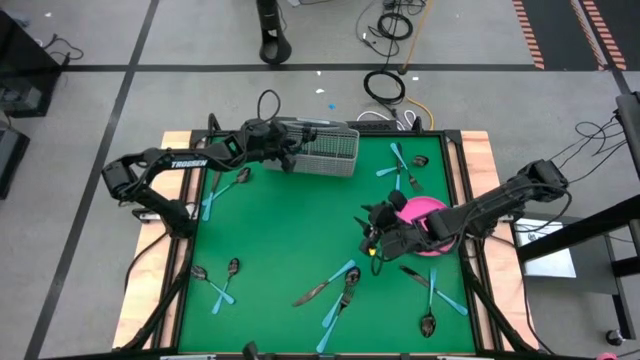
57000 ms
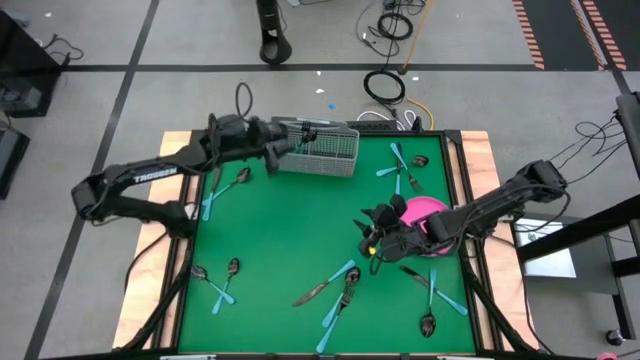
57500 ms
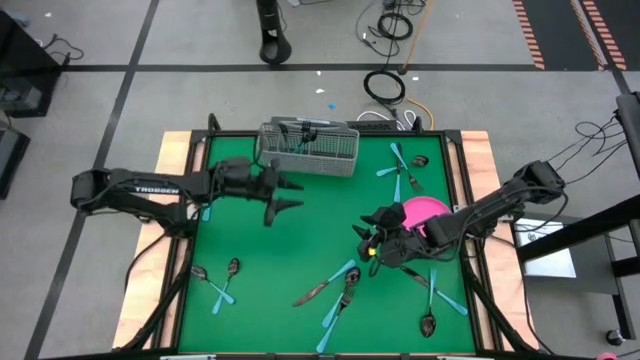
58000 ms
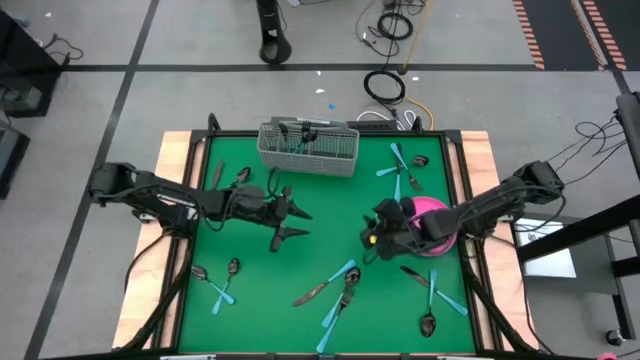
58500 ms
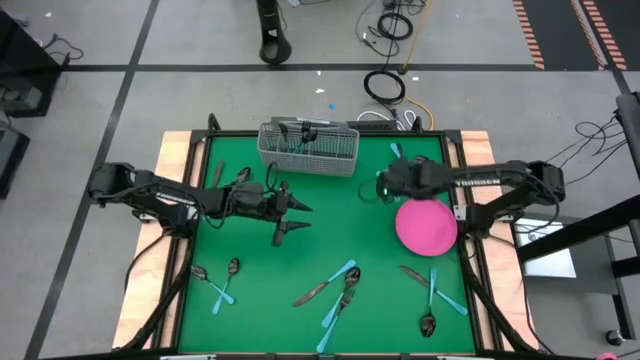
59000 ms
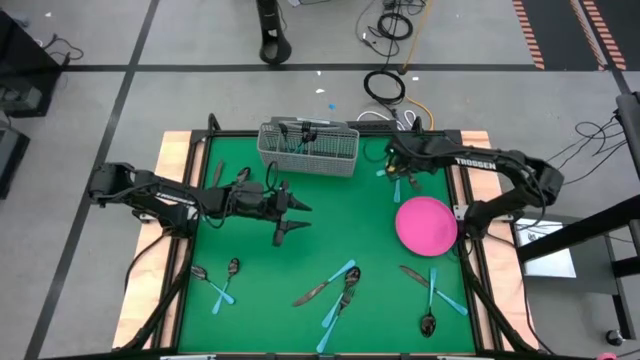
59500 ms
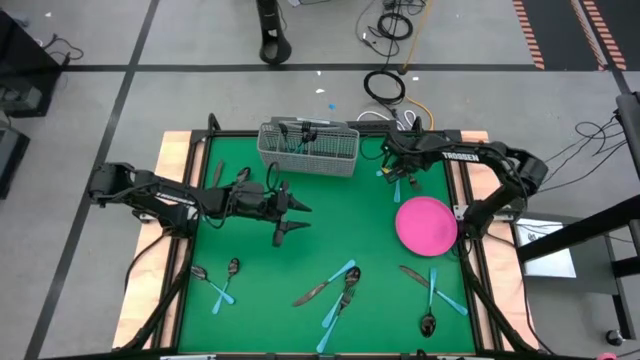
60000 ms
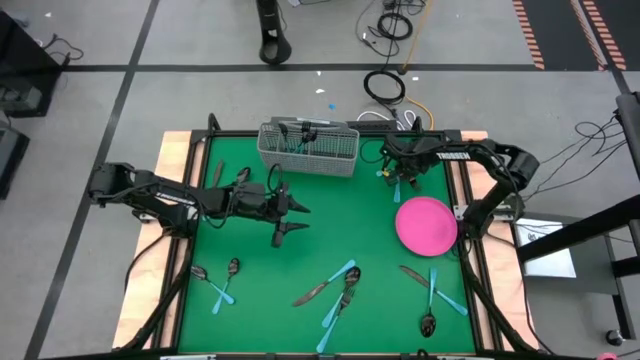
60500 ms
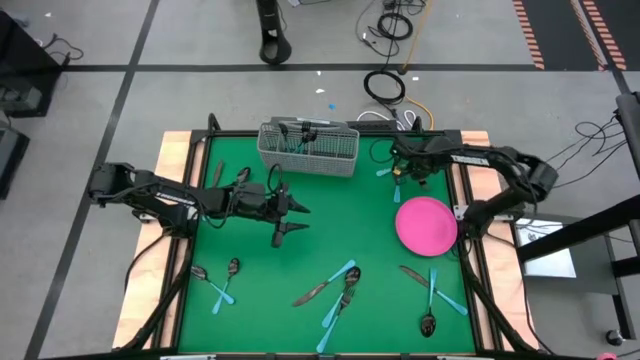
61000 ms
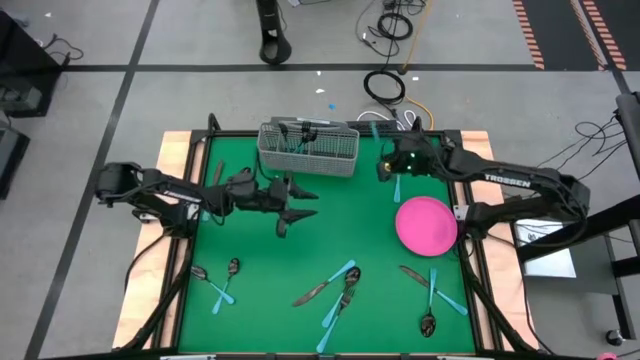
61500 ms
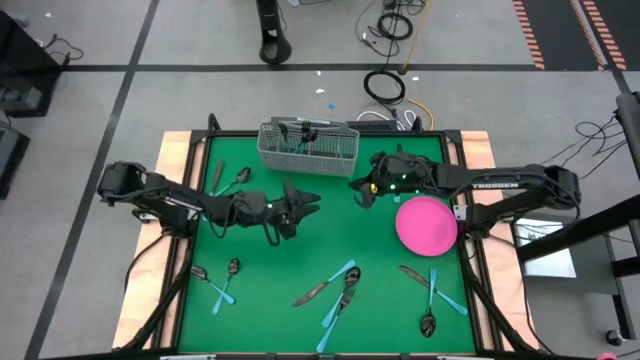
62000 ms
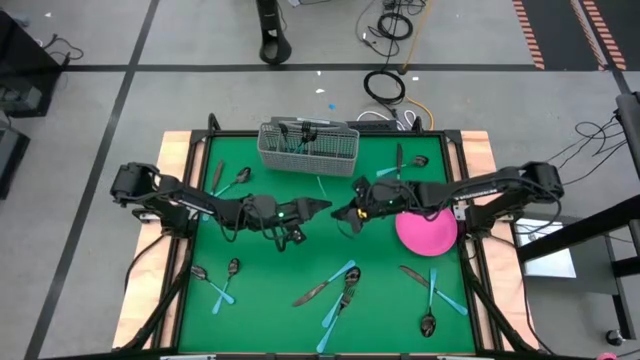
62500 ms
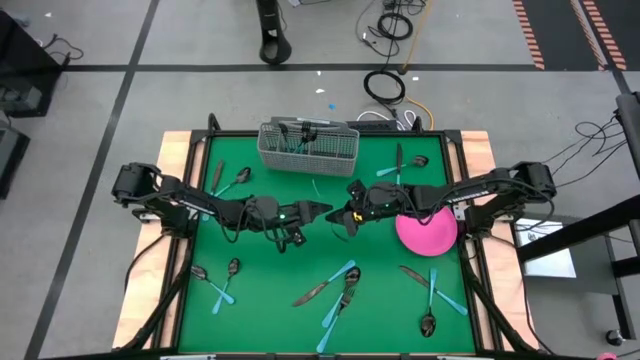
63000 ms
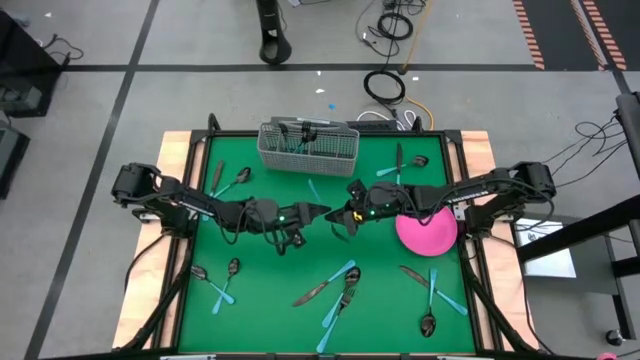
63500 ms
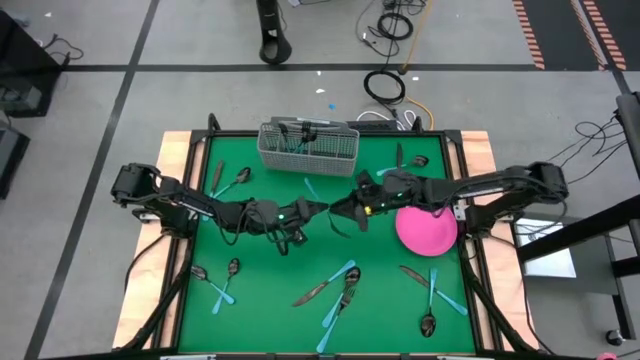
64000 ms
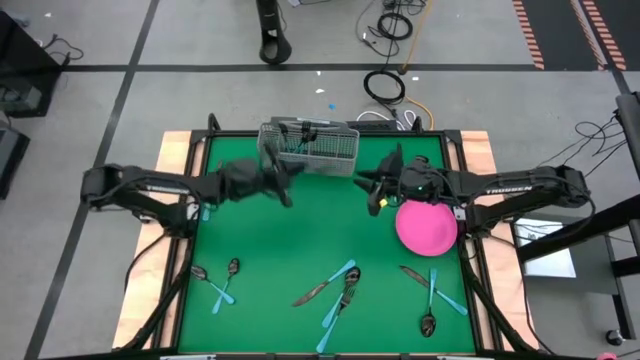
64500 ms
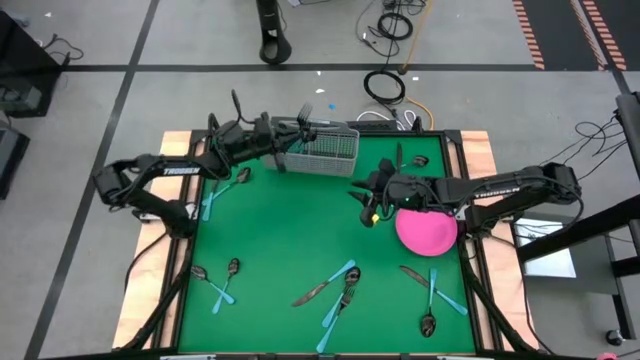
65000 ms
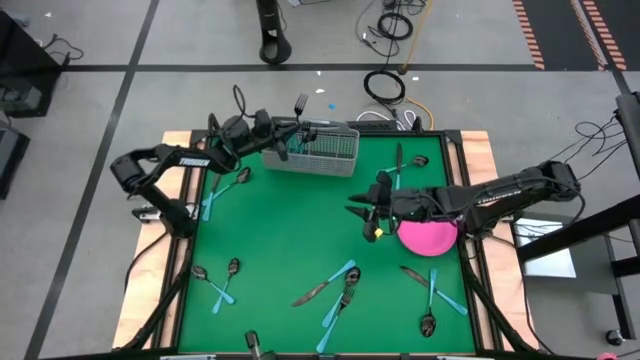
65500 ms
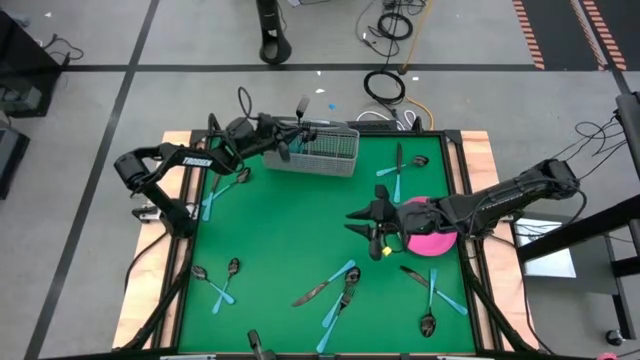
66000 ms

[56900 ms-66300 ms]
Task: Sort silverware
Put the blue fork into the silverware tray with the other blue forks

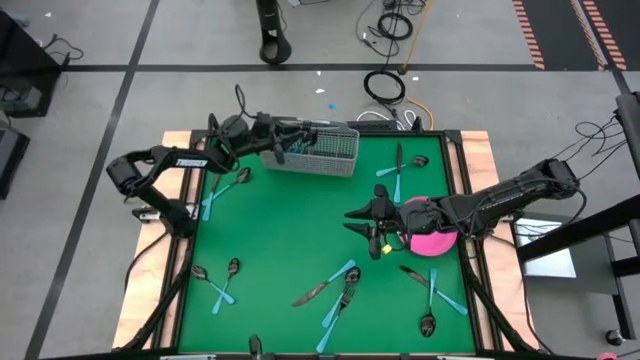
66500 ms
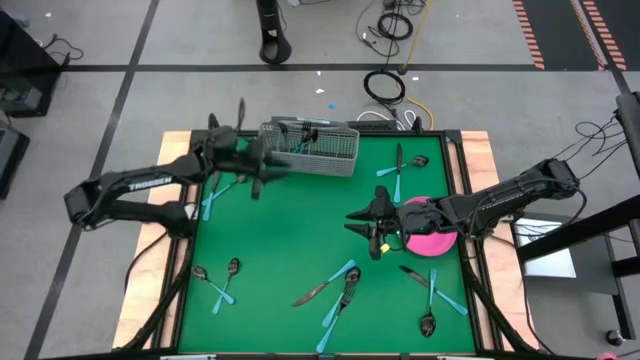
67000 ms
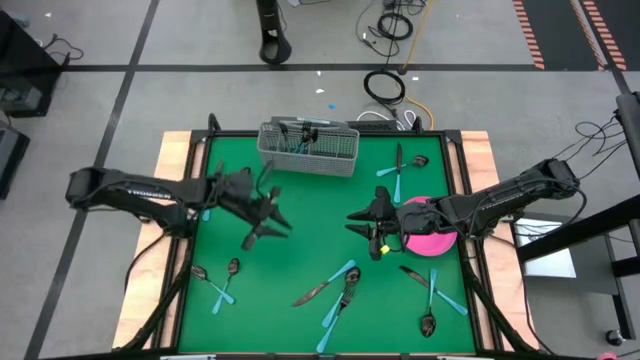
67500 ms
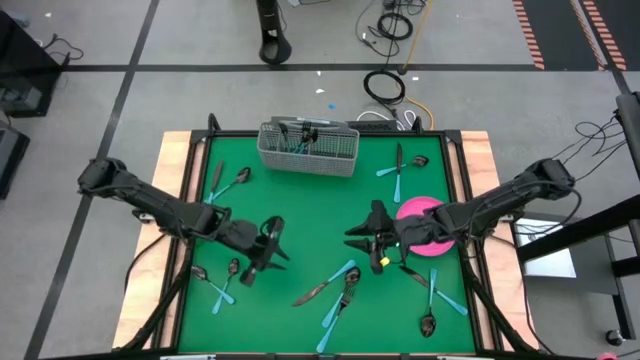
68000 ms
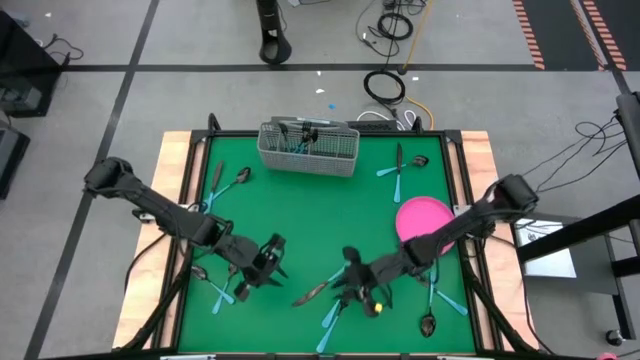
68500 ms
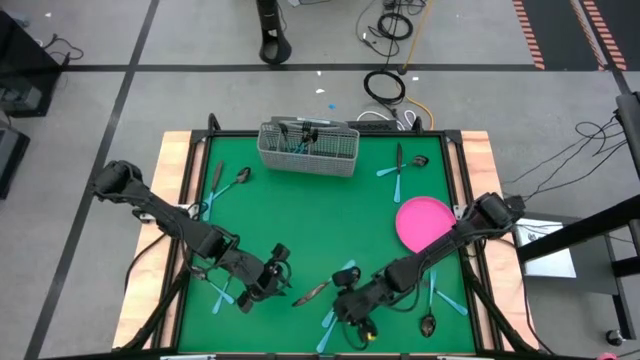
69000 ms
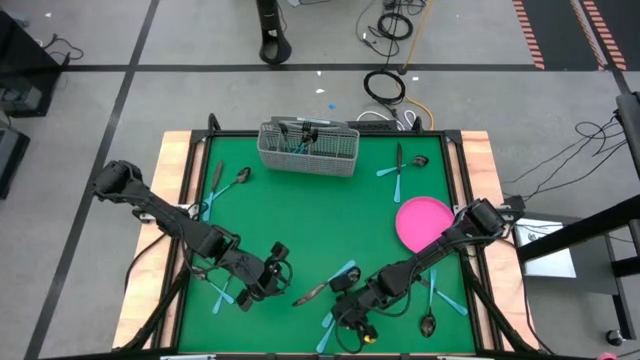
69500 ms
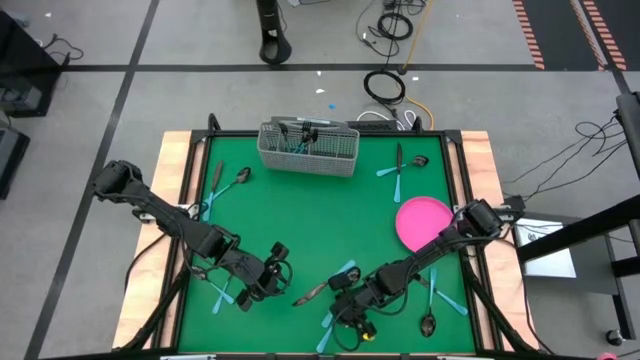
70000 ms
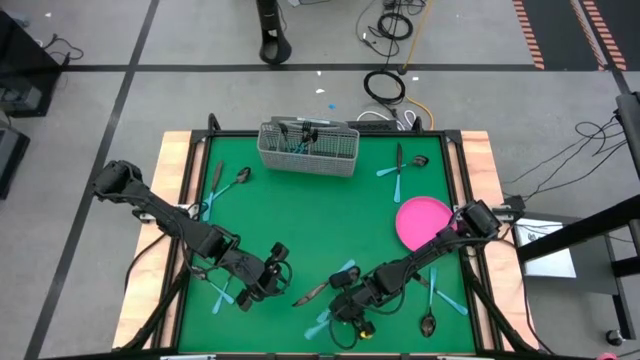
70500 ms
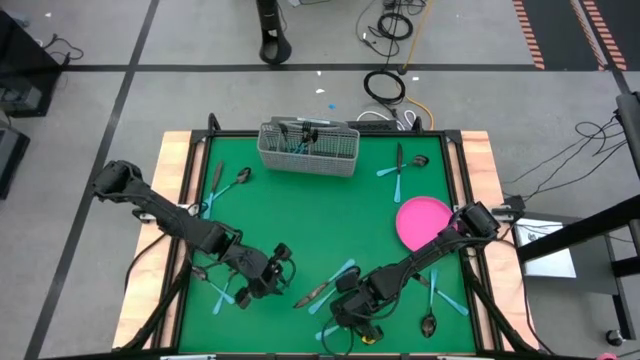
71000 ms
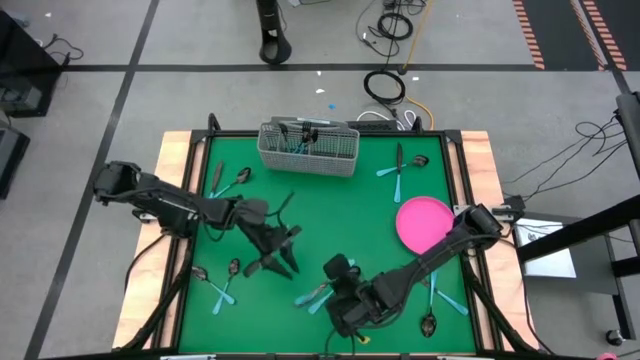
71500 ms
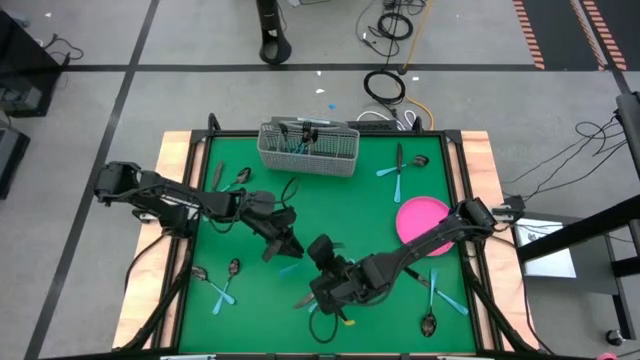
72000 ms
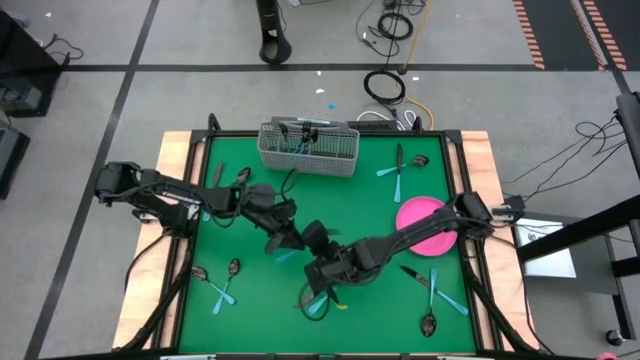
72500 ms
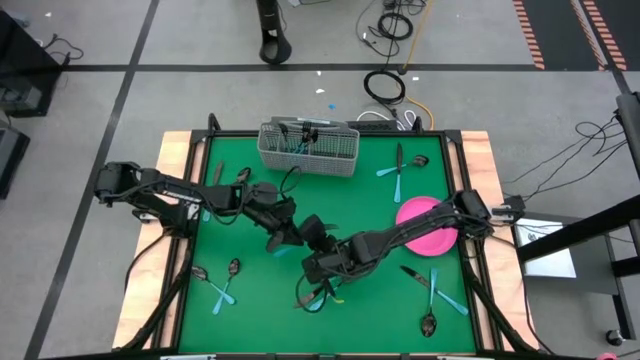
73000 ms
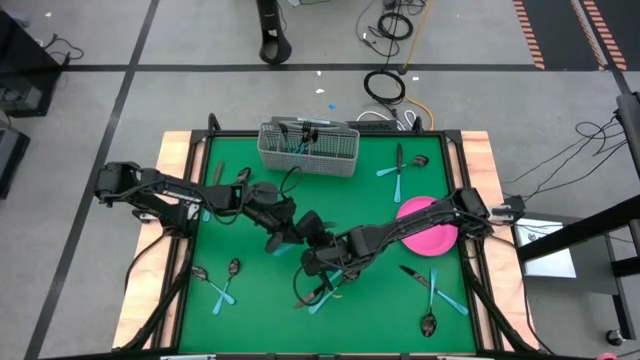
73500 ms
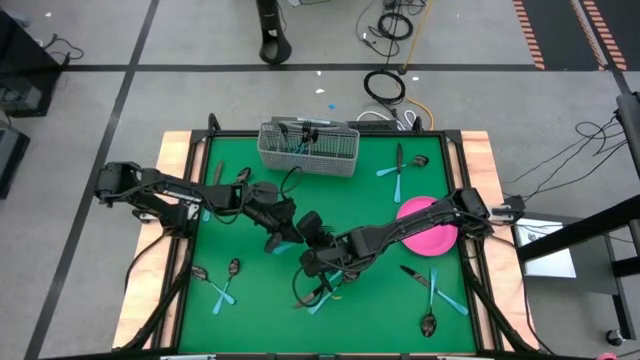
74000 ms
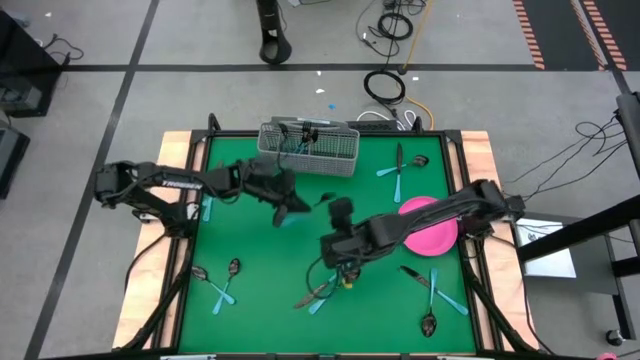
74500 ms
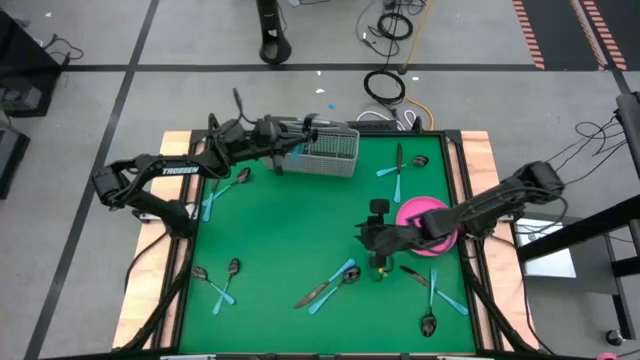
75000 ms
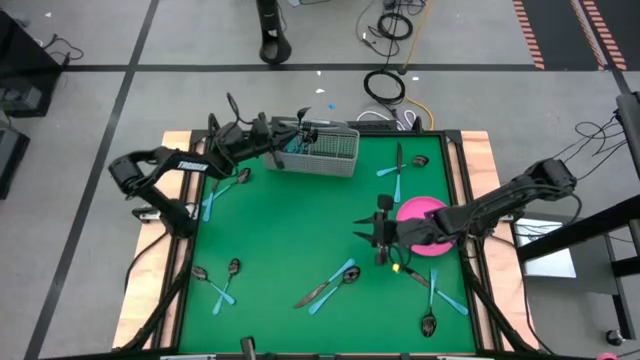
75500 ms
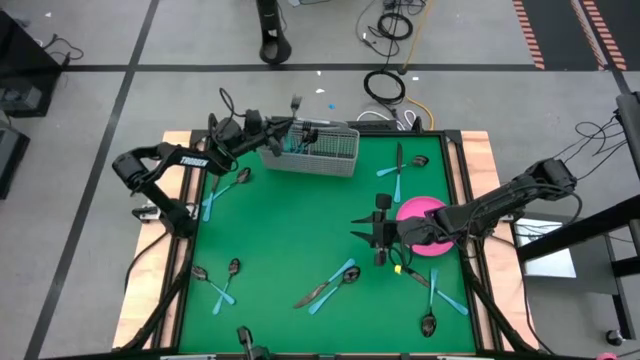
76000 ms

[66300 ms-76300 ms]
Put the blue fork into the silverware tray with the other blue forks

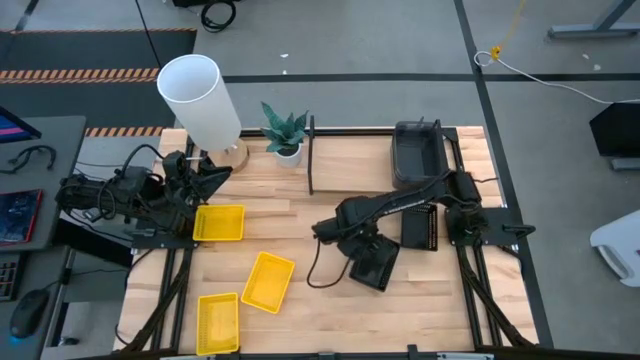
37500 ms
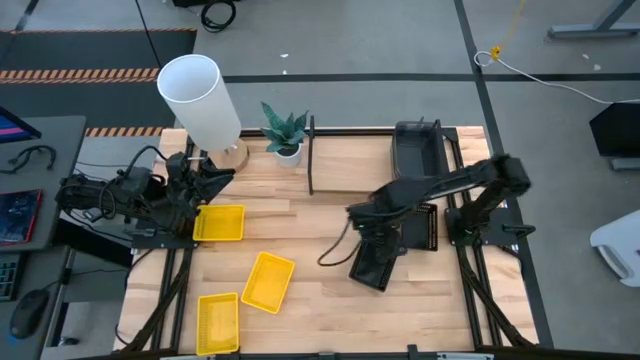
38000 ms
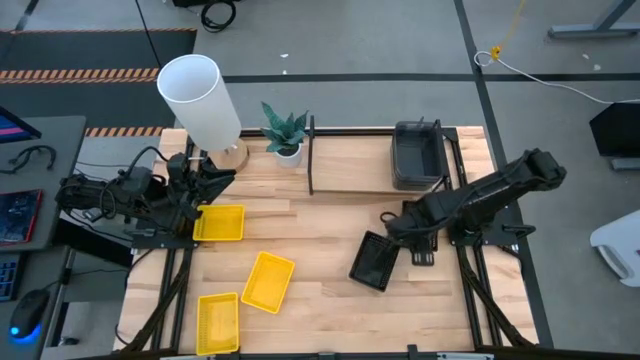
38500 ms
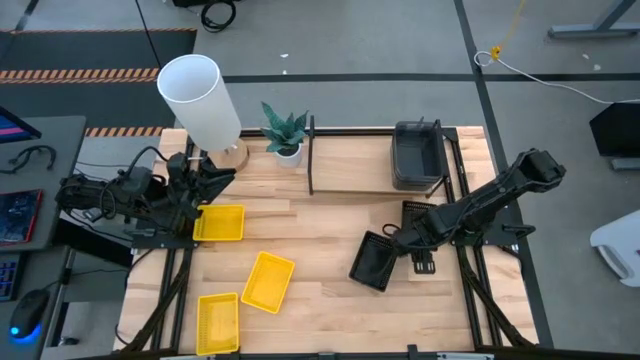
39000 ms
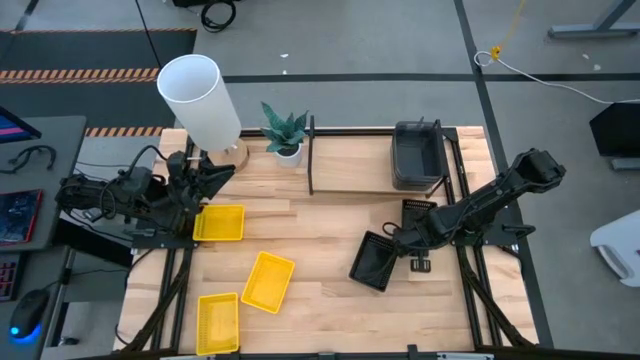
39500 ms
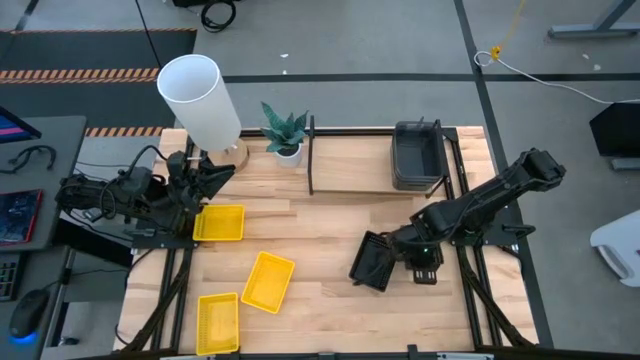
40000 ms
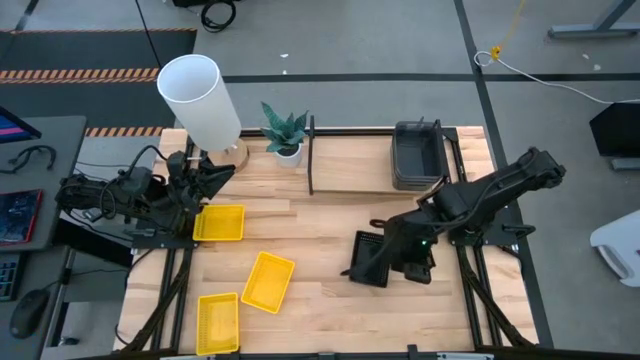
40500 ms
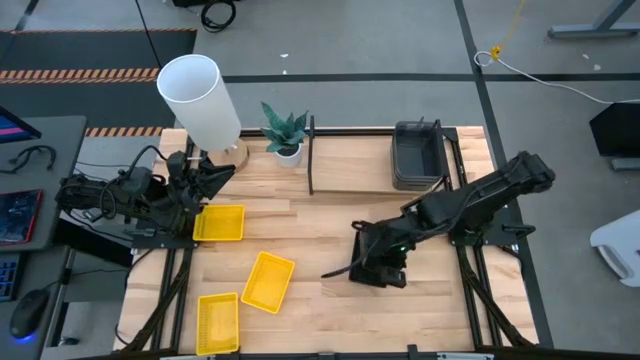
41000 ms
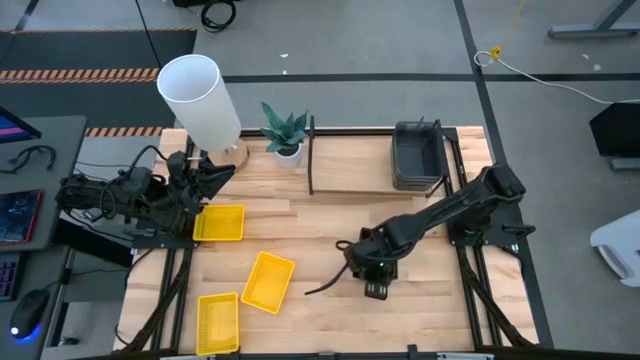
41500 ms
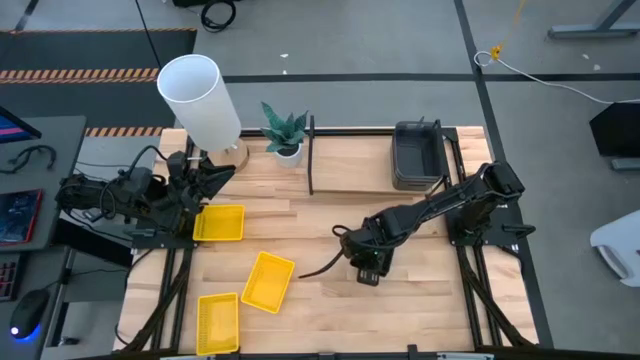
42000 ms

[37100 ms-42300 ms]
Task: Stack baskets on shelf by color
Stack the black bin on top of the other black bins
